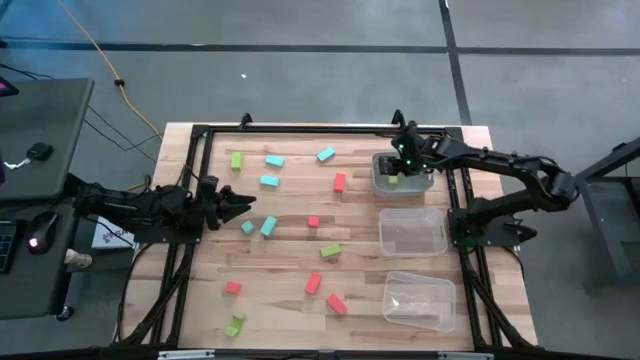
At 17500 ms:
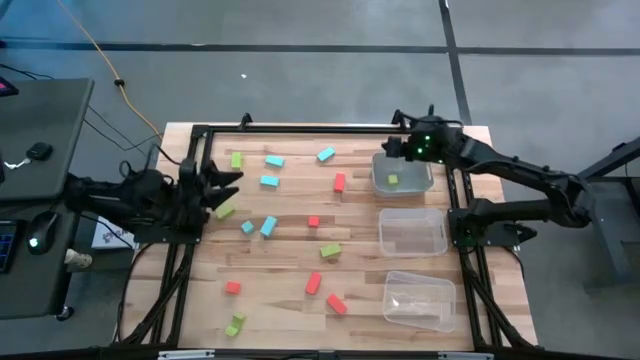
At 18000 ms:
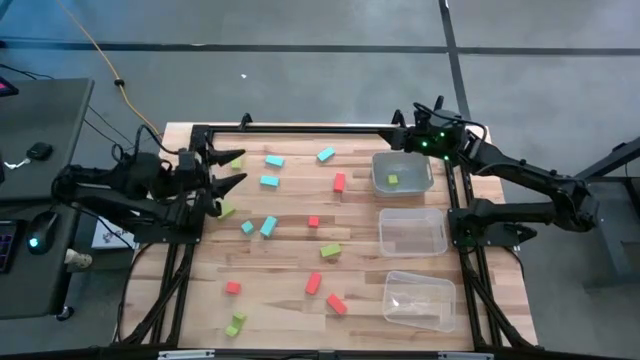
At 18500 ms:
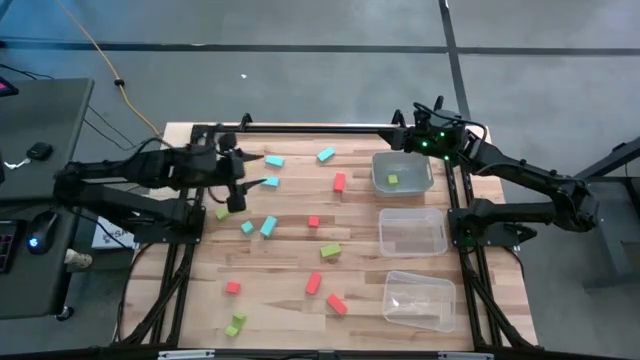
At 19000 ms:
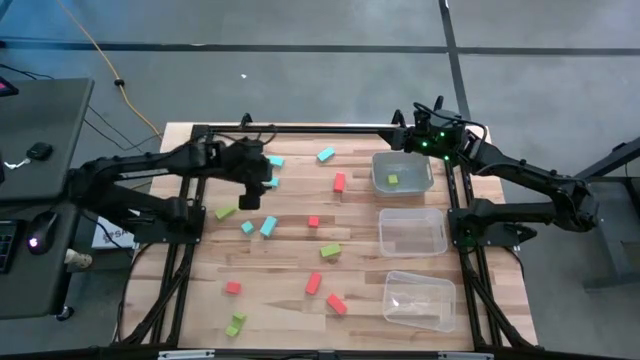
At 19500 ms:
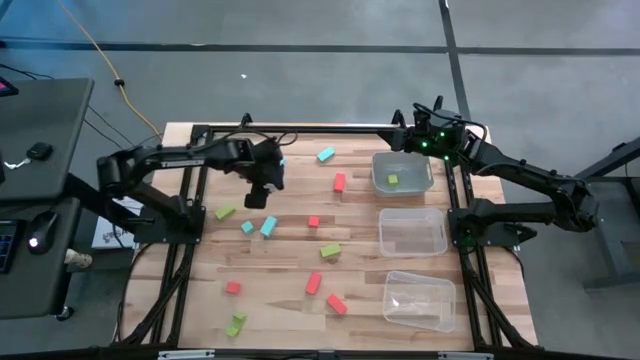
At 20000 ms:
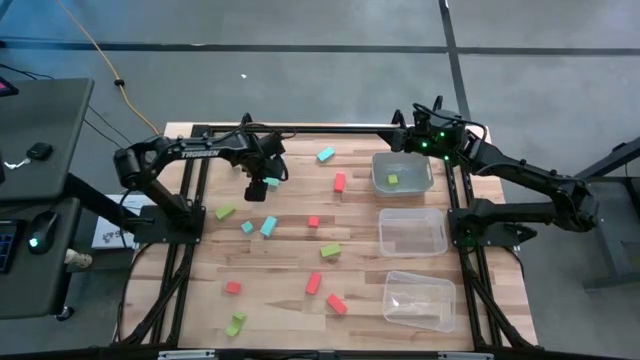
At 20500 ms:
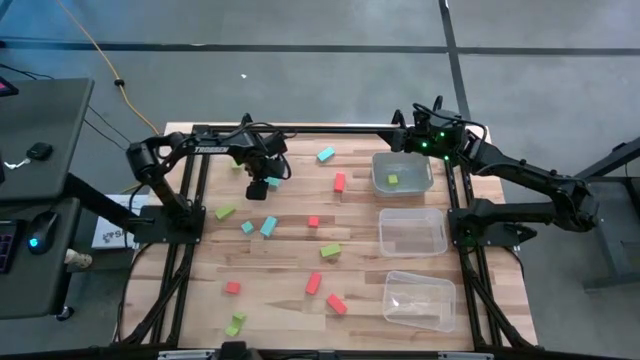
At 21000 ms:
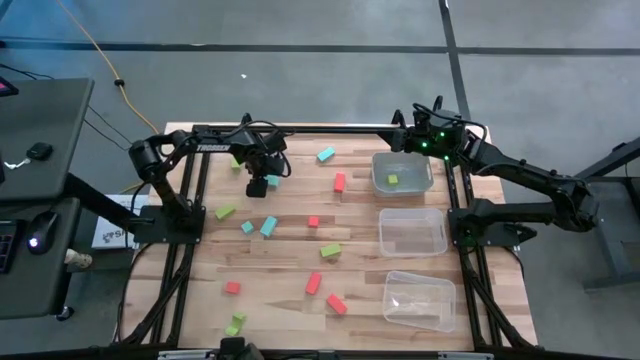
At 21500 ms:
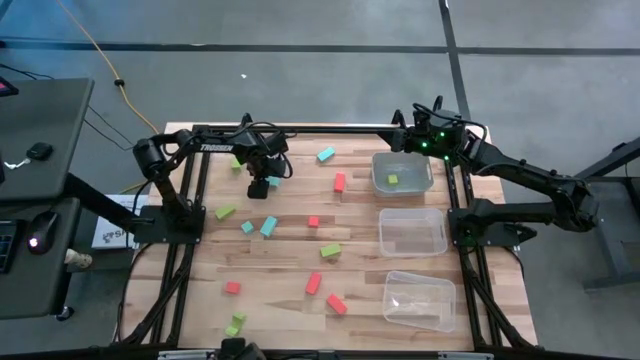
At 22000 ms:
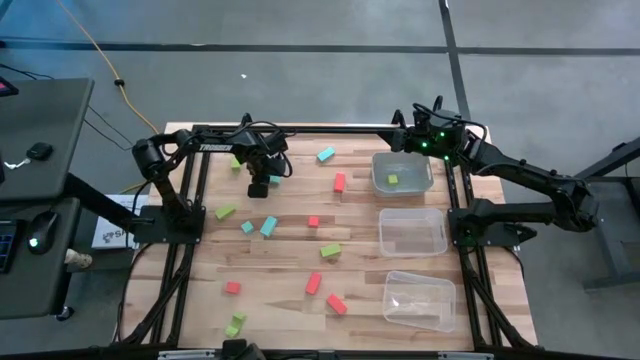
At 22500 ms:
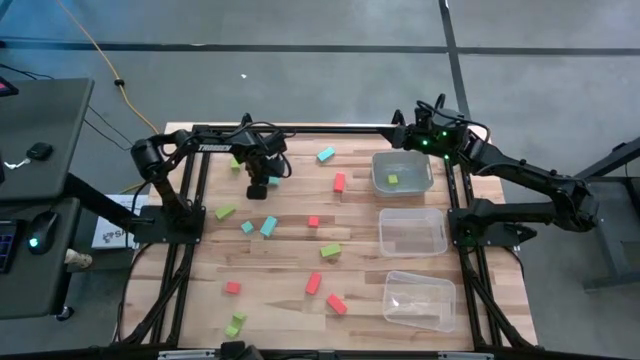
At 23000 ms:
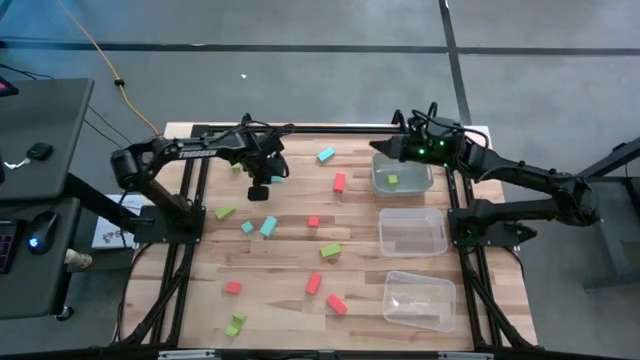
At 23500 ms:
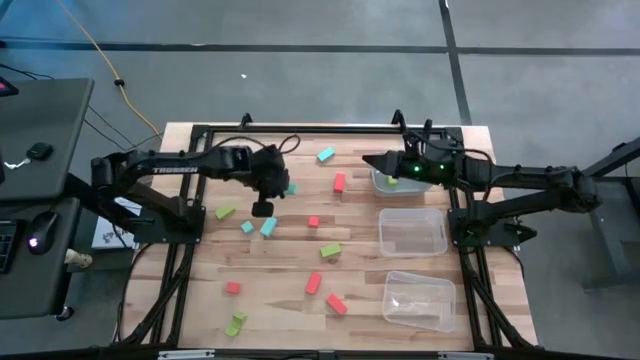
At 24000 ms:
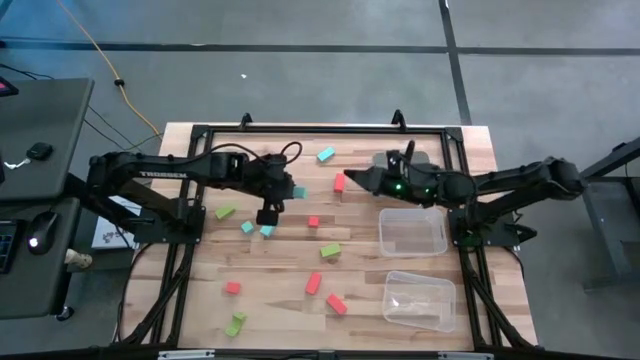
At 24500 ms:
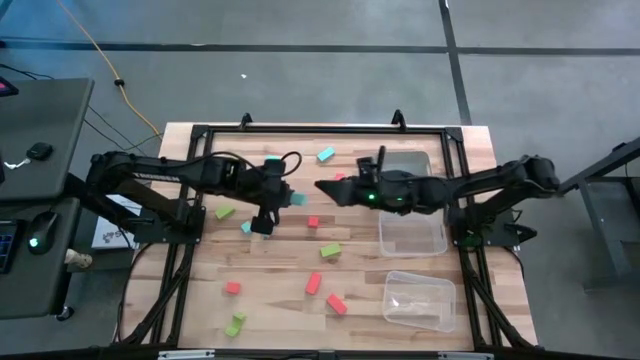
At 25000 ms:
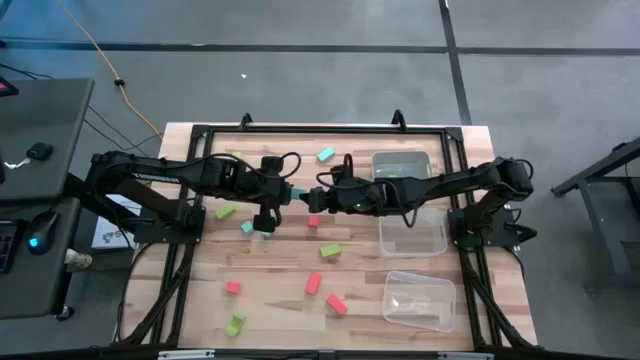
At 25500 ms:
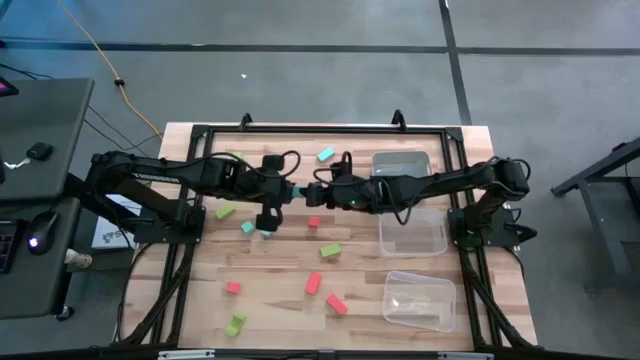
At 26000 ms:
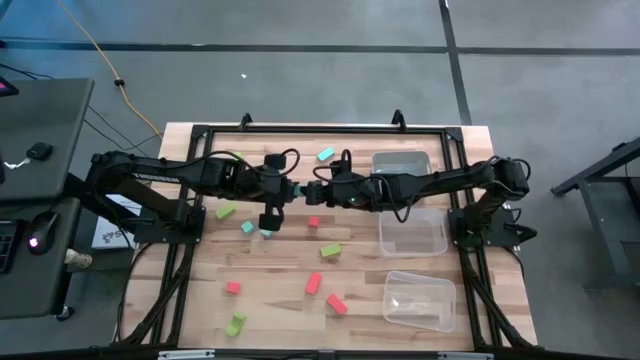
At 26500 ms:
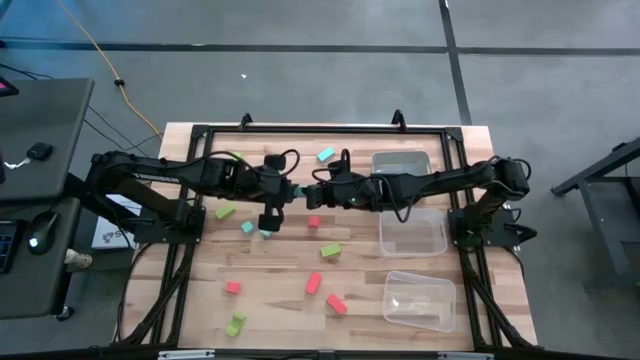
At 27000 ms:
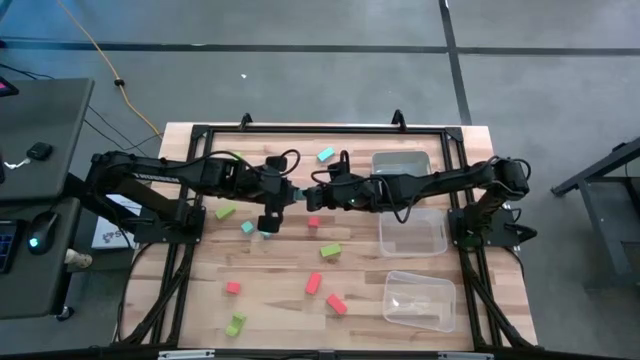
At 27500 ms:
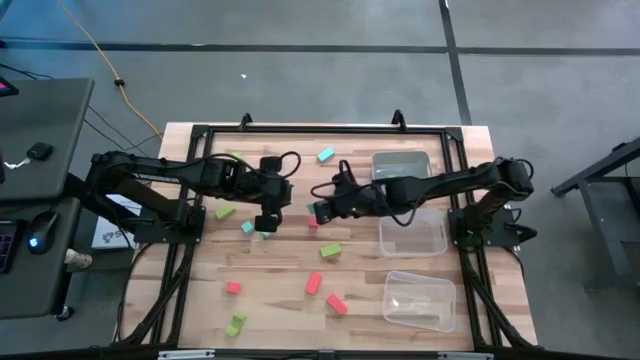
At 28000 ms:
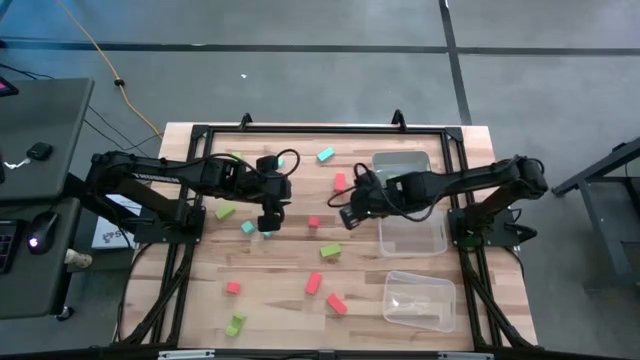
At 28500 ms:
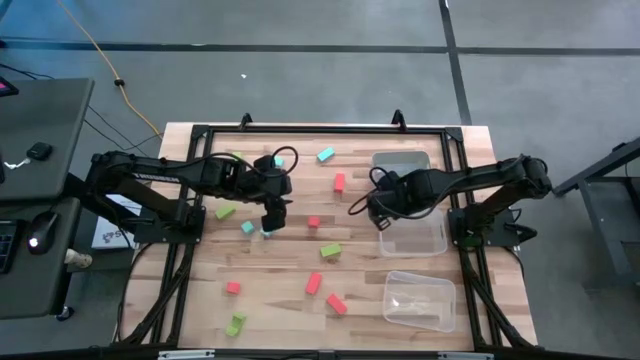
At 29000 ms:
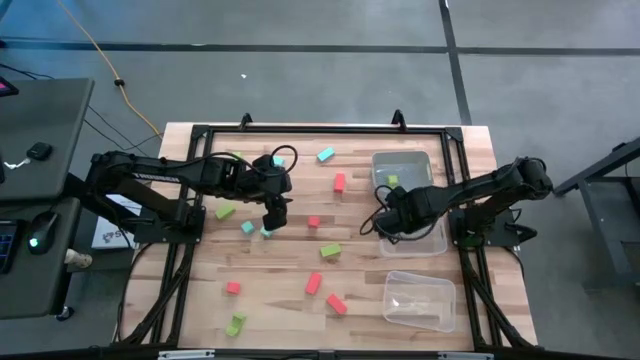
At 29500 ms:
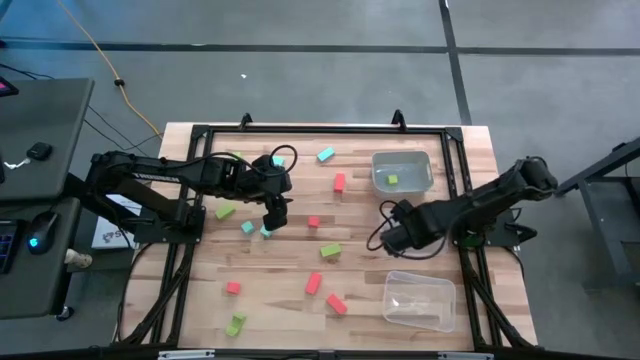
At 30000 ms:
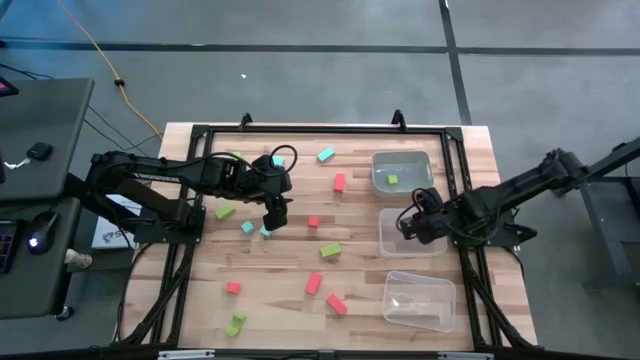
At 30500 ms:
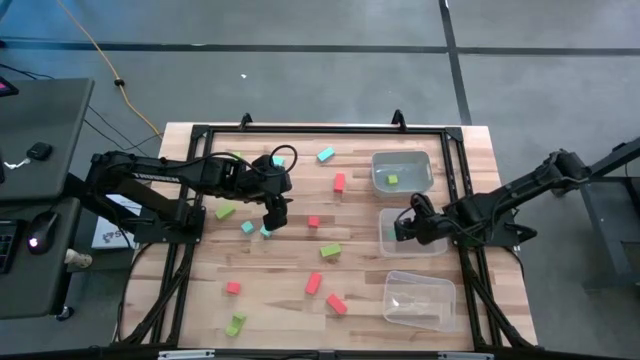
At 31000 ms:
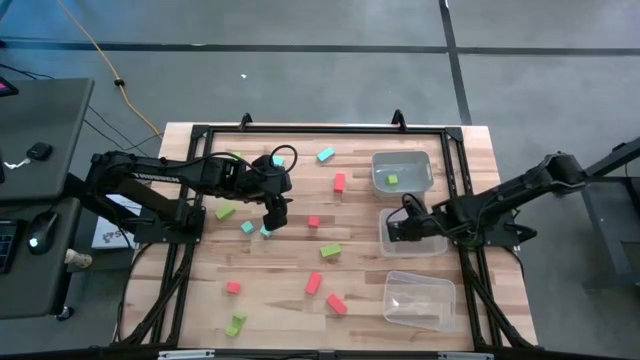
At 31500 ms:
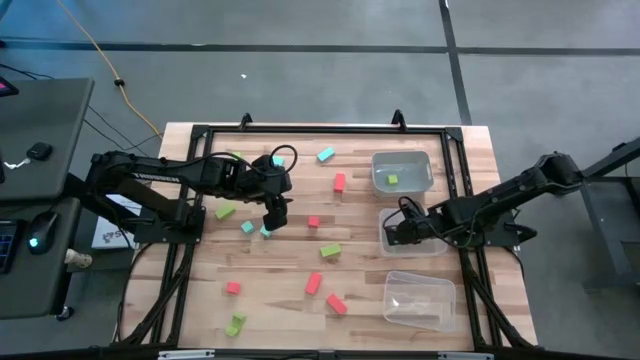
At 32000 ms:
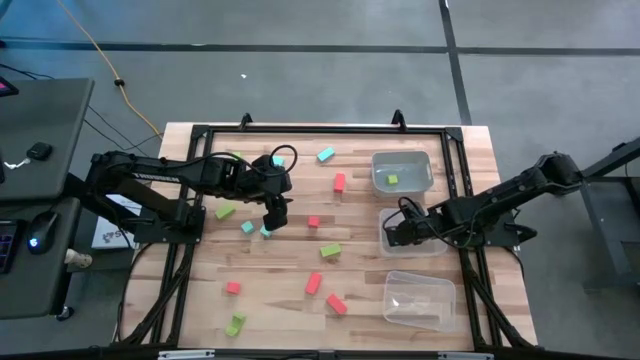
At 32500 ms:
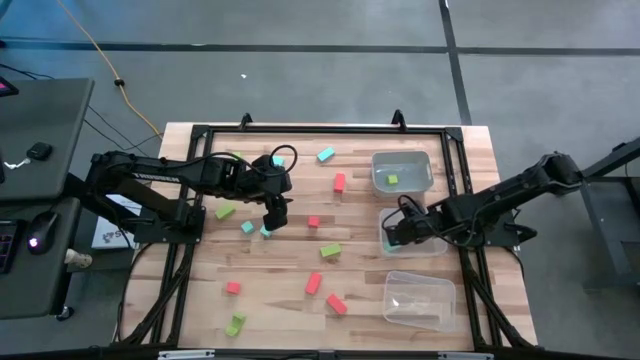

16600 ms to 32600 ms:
Task: Sort & place blocks by color
Put the light blue block into the top transparent bin

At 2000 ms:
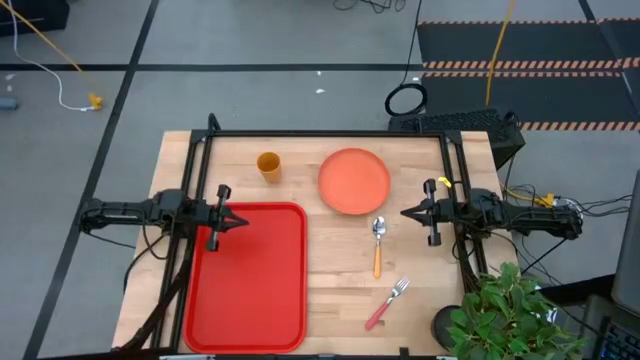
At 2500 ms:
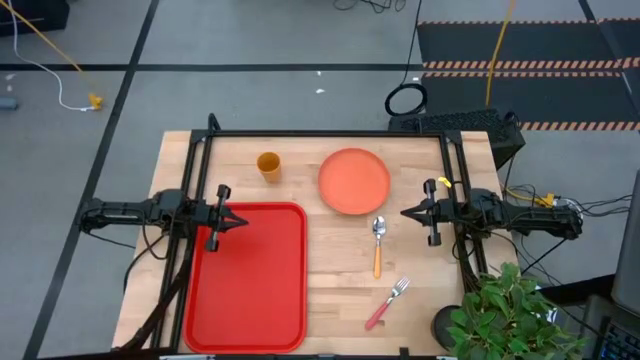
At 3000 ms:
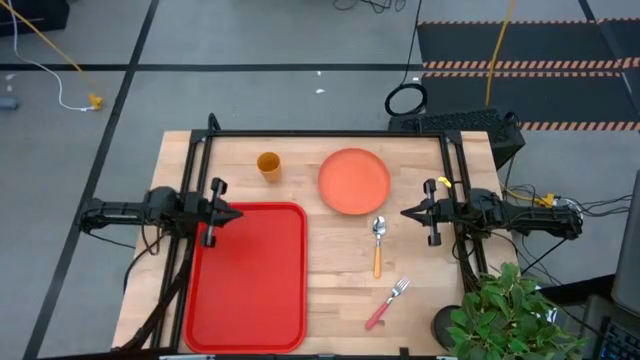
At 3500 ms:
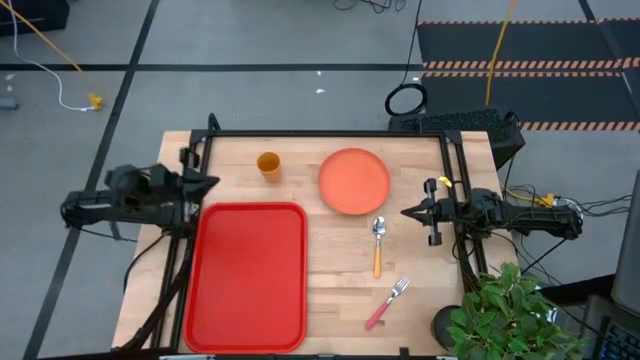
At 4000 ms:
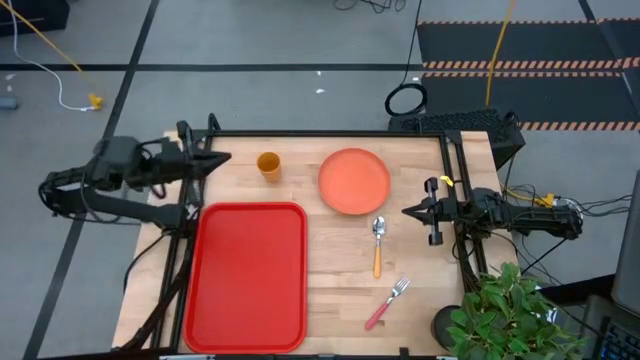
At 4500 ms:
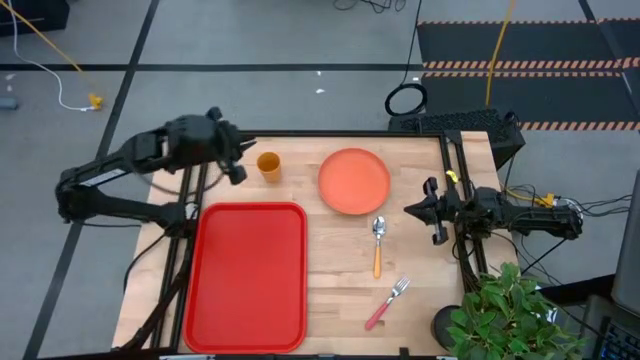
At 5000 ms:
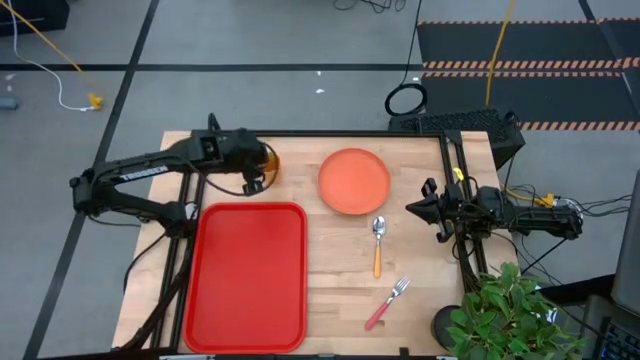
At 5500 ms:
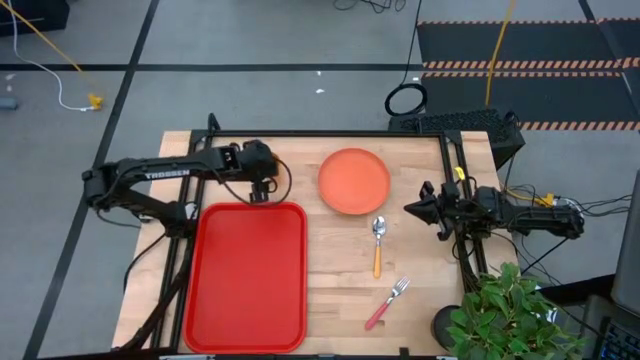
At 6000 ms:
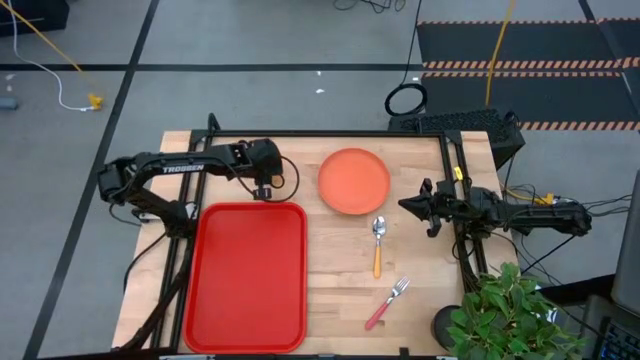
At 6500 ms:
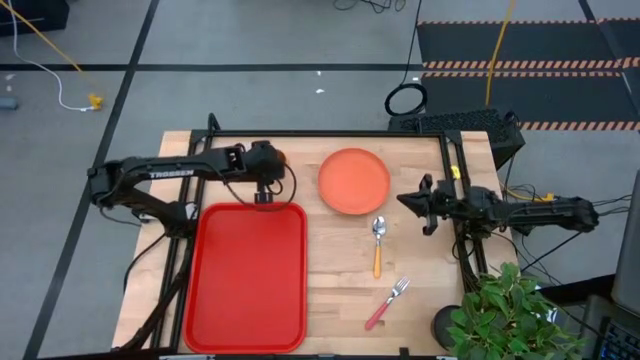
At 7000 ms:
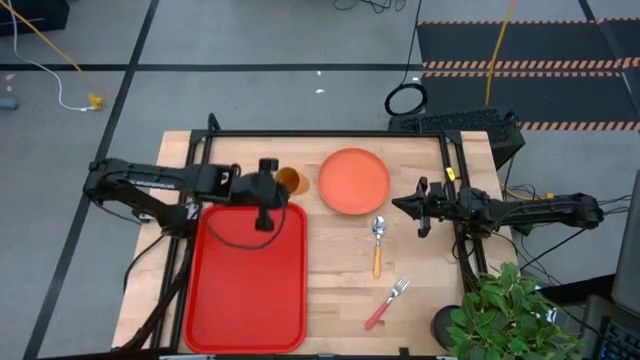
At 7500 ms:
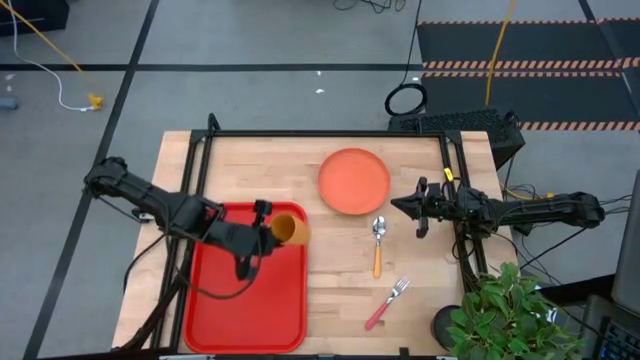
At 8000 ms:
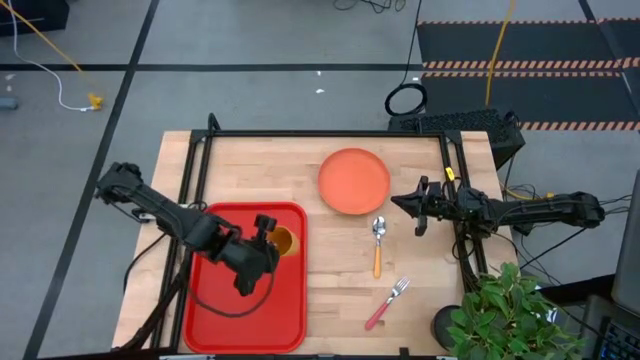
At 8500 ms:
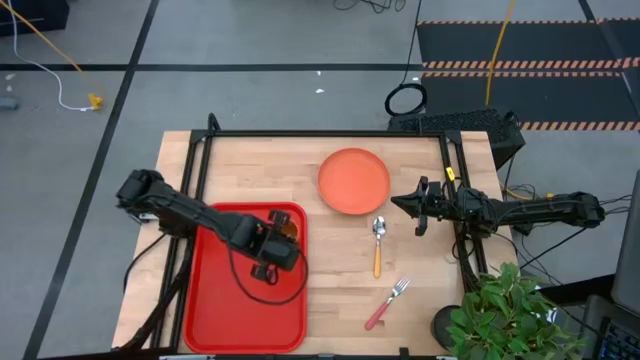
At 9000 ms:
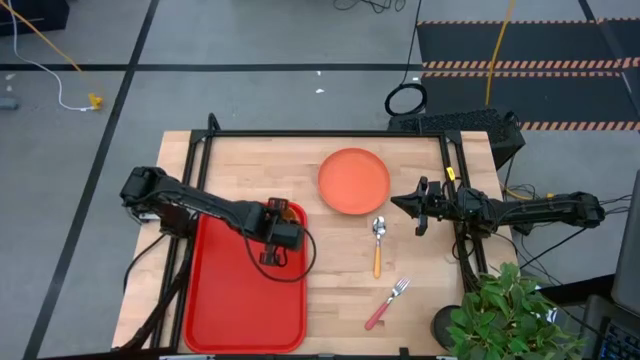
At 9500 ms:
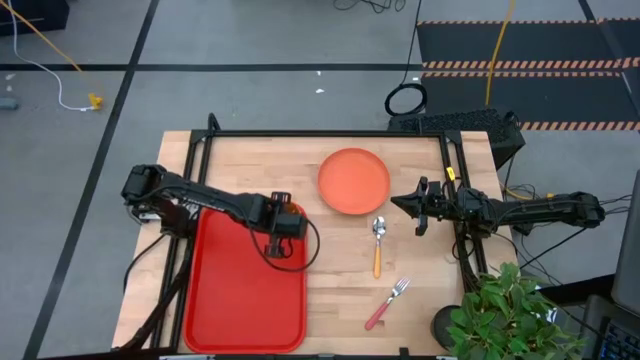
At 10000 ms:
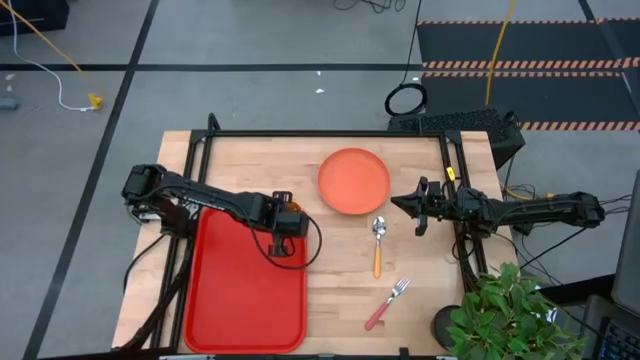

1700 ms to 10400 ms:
Task: Pick and place plate/cup/fork/spoon on tray
Put the yellow cup on the top right of the red tray
